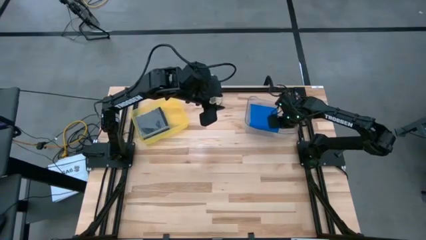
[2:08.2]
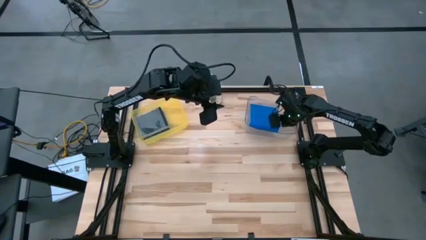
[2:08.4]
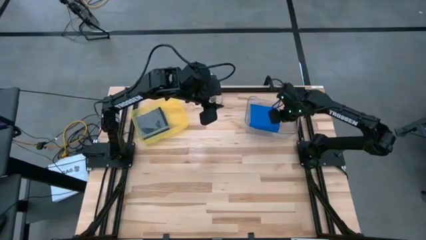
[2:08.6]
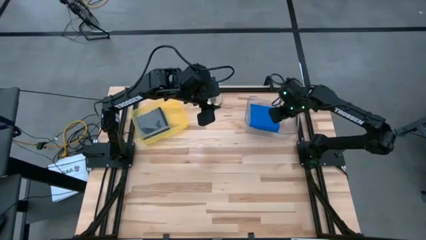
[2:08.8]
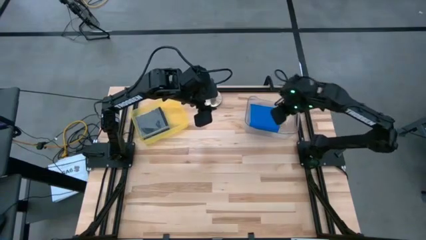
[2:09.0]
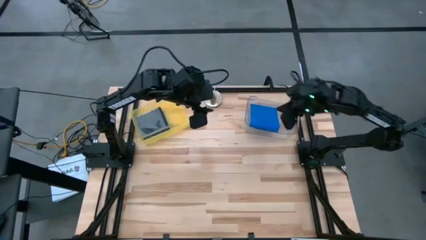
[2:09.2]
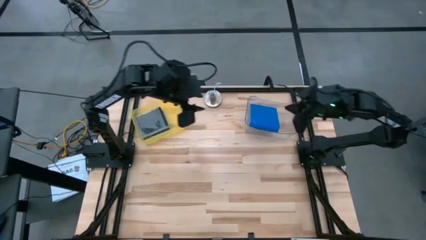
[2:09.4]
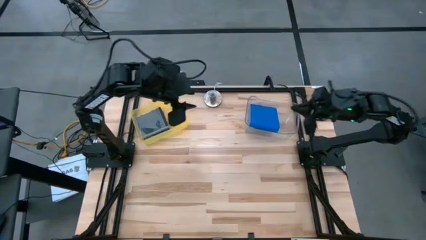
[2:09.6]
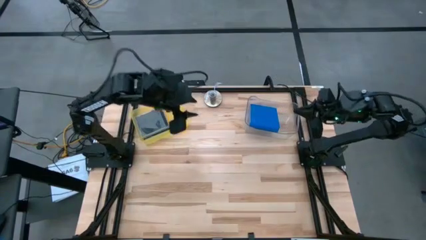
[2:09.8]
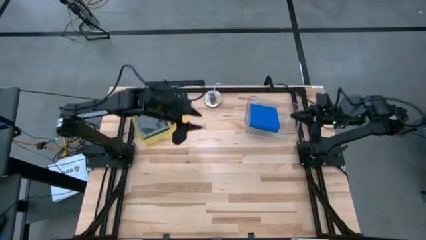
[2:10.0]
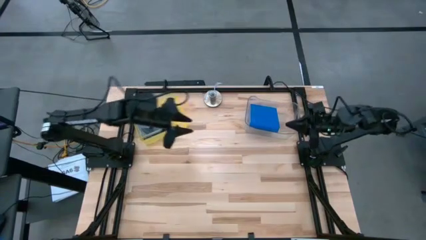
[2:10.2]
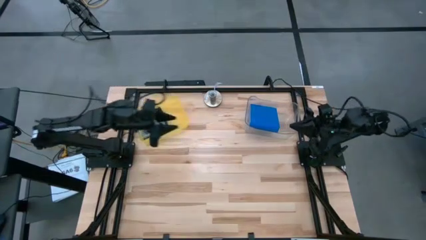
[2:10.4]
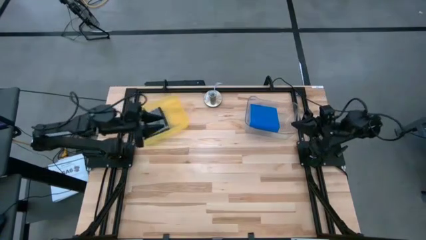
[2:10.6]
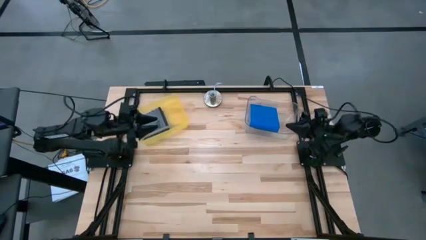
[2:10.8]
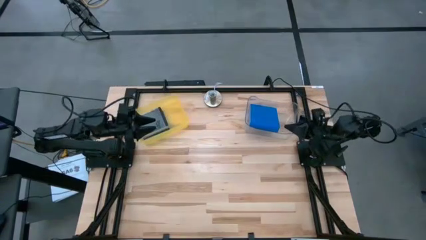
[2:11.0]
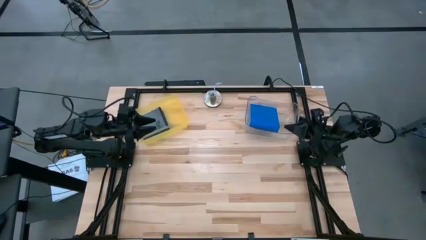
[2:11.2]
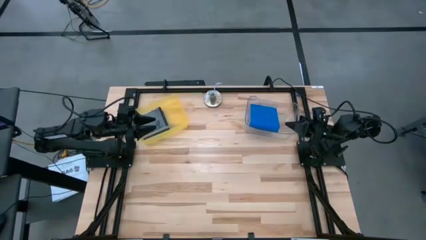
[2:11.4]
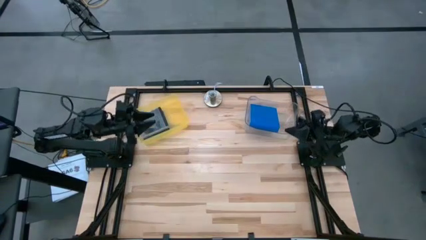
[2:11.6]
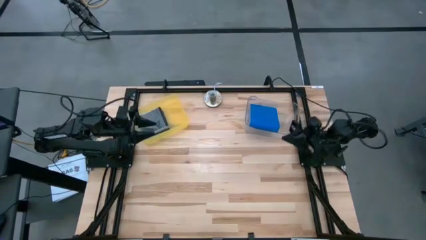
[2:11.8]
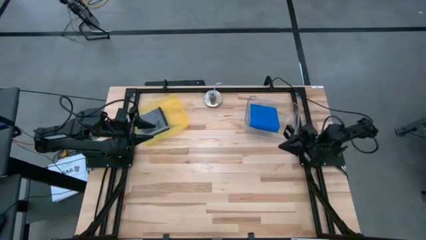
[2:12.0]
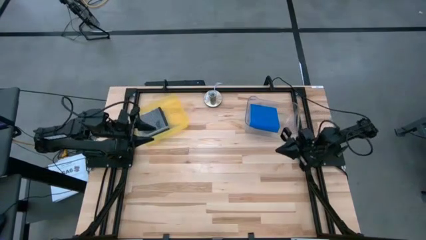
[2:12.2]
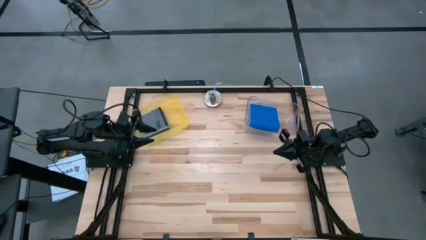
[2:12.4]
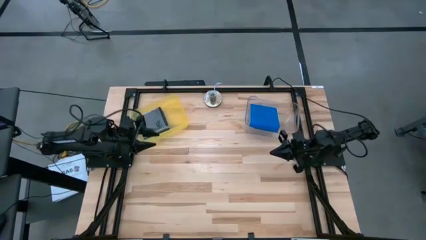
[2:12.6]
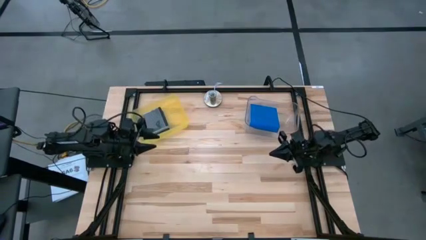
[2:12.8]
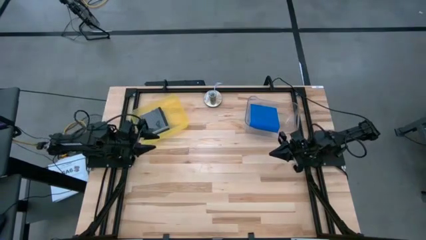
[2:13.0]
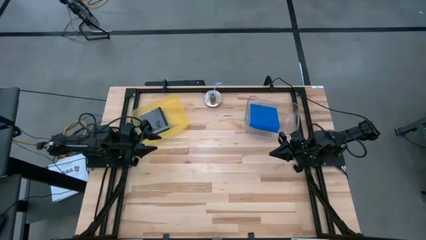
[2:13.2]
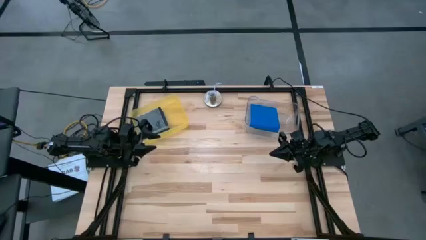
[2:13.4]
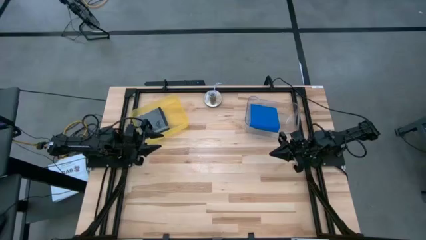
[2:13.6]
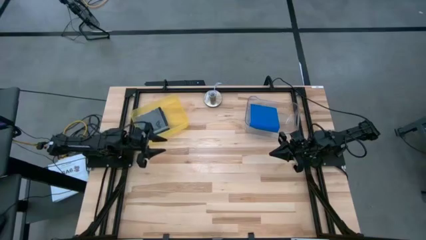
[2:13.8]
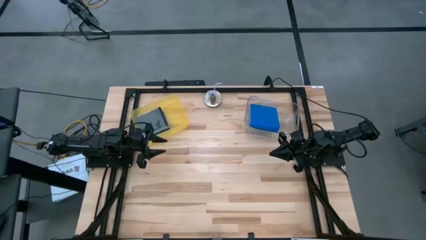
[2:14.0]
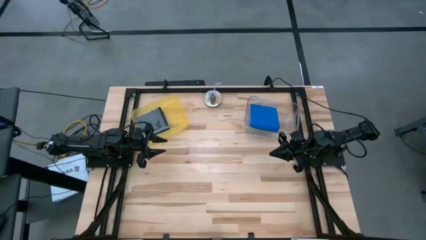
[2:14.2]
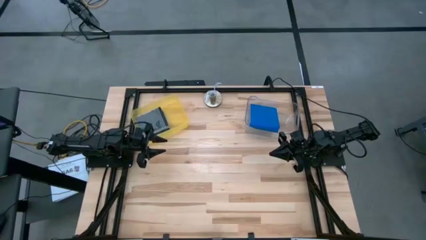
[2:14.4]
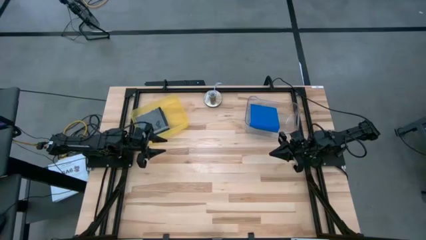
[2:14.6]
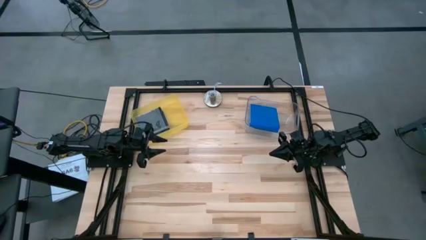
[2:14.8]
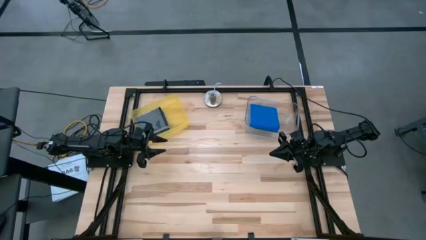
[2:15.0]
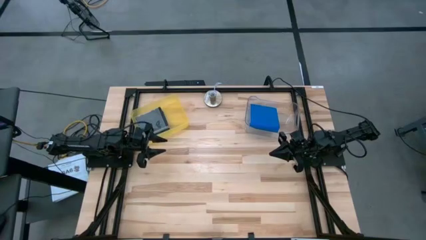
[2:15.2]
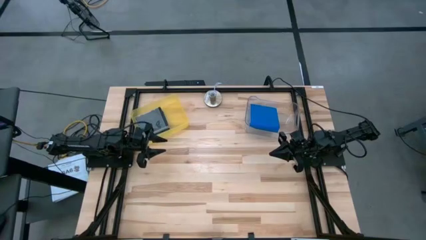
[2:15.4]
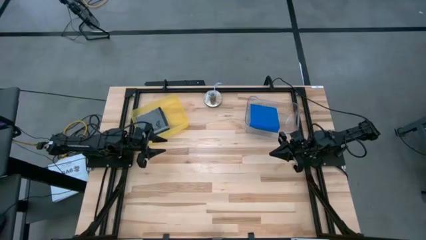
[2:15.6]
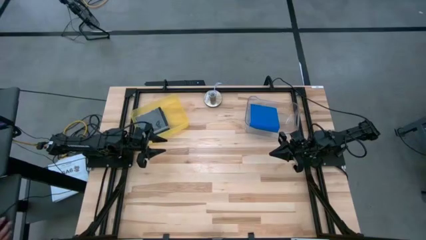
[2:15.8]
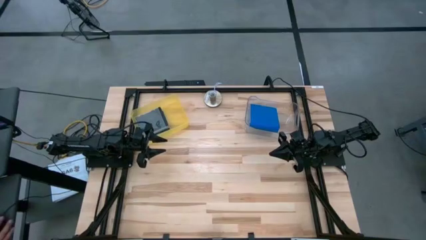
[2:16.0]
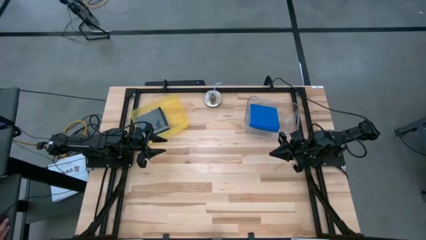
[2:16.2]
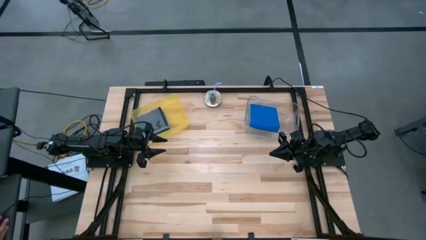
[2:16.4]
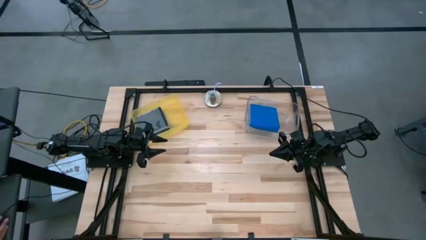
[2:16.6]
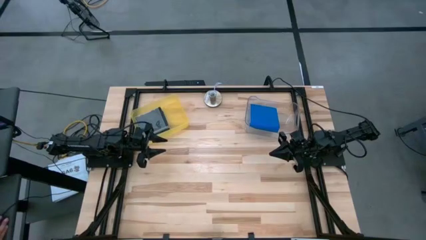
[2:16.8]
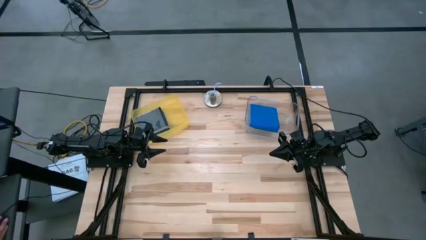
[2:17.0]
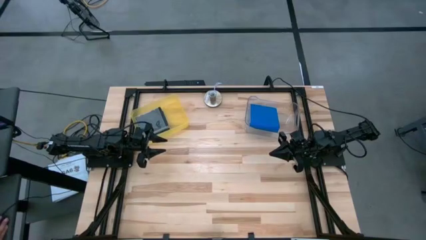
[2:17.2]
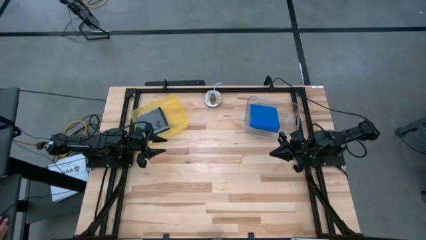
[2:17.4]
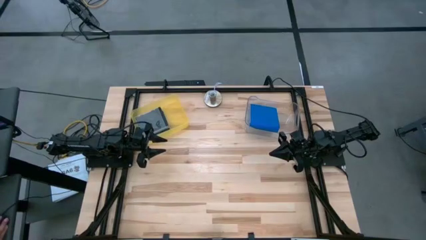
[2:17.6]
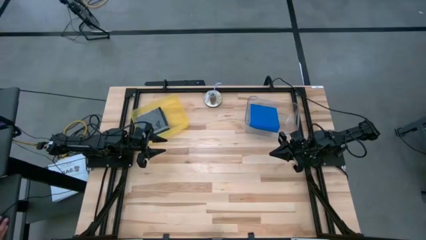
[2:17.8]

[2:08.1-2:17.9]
Task: Pick & place jewel cases by type
Return to Home Position

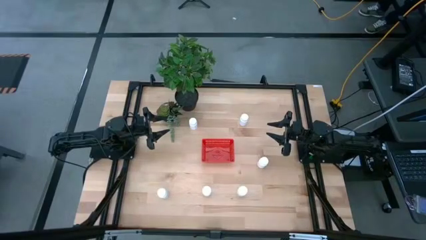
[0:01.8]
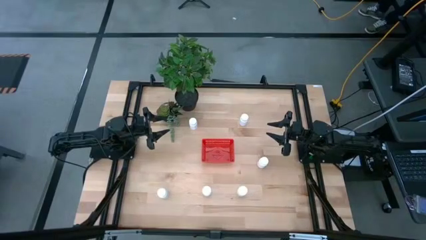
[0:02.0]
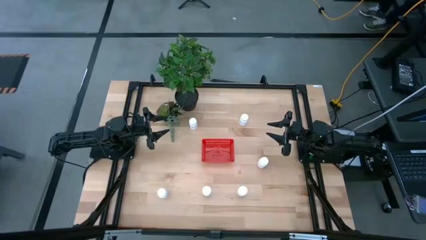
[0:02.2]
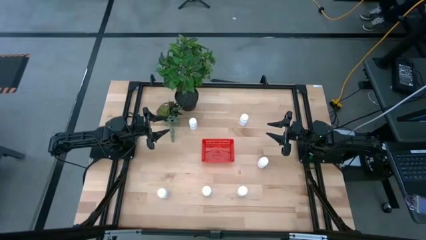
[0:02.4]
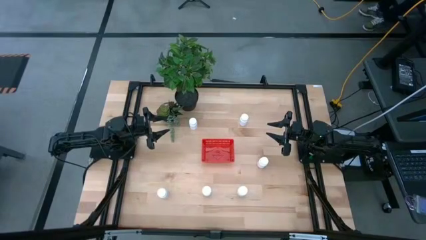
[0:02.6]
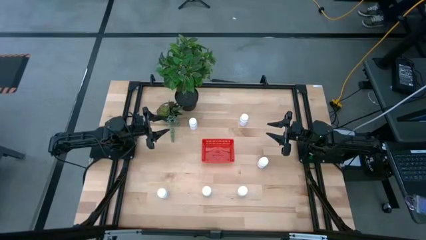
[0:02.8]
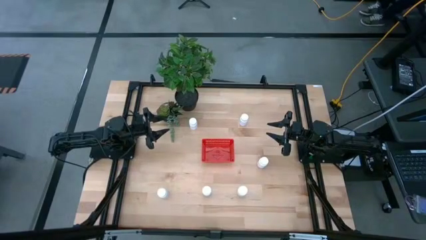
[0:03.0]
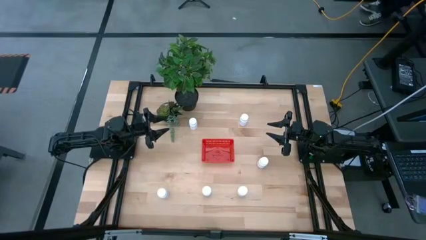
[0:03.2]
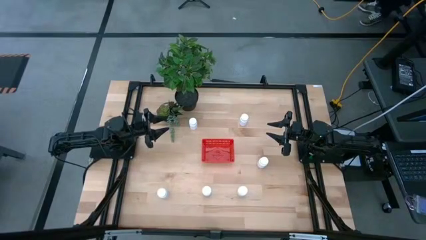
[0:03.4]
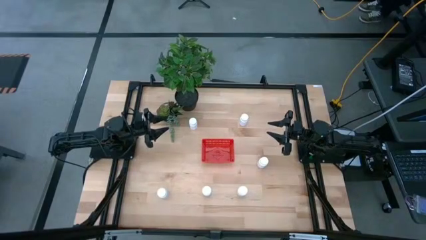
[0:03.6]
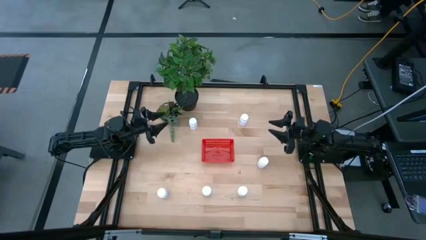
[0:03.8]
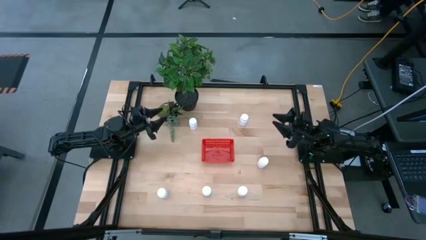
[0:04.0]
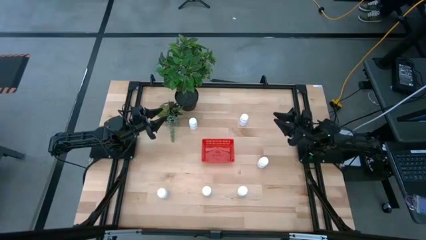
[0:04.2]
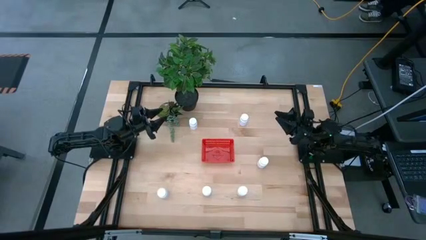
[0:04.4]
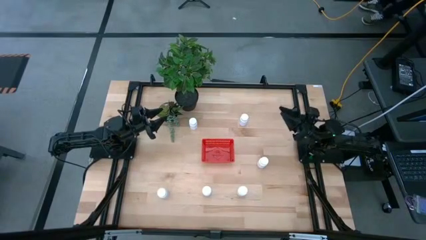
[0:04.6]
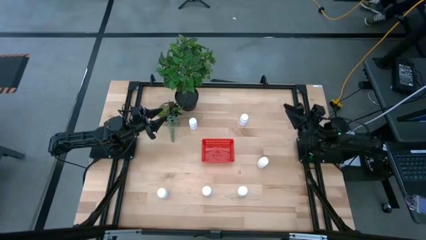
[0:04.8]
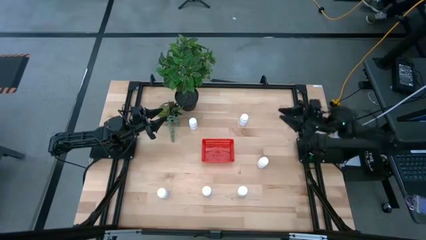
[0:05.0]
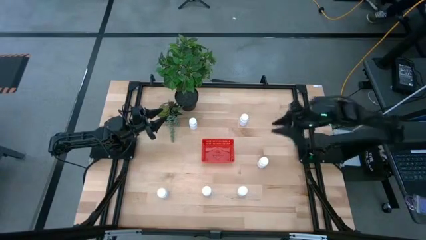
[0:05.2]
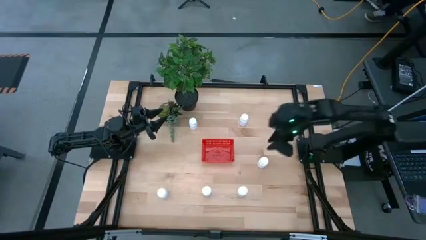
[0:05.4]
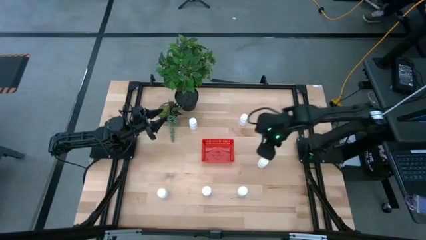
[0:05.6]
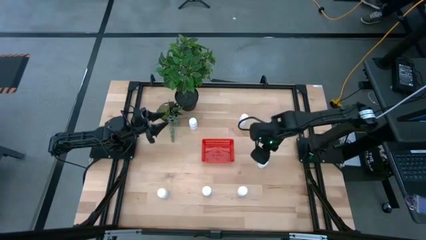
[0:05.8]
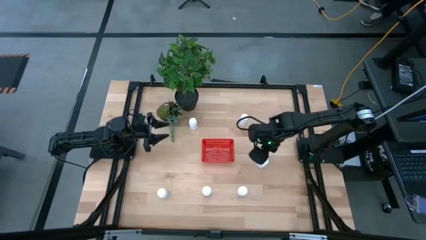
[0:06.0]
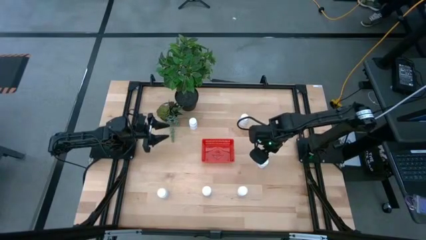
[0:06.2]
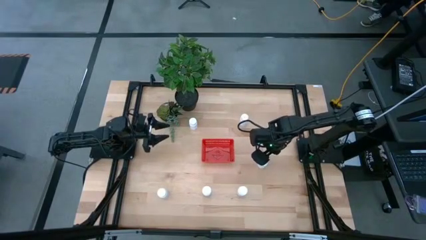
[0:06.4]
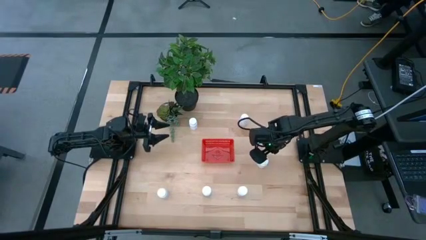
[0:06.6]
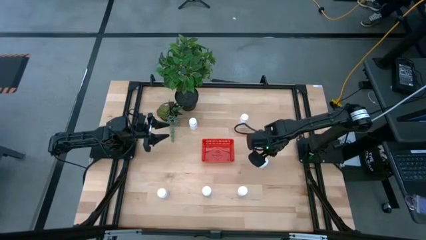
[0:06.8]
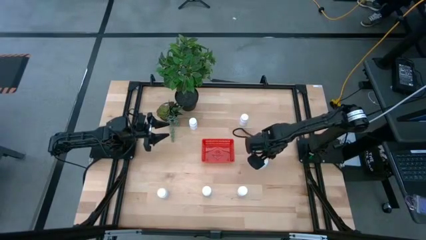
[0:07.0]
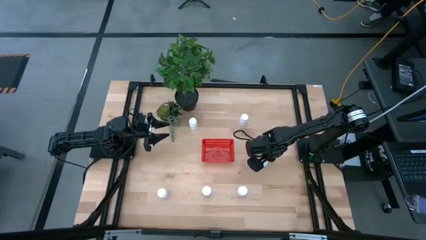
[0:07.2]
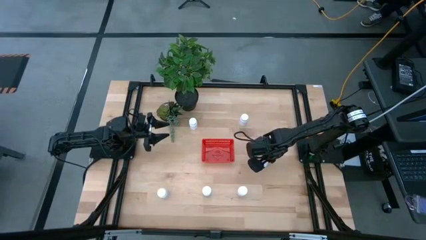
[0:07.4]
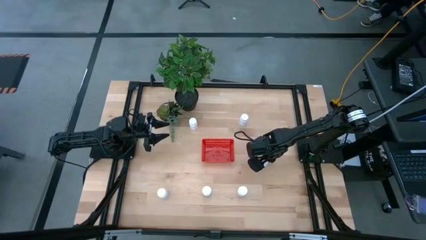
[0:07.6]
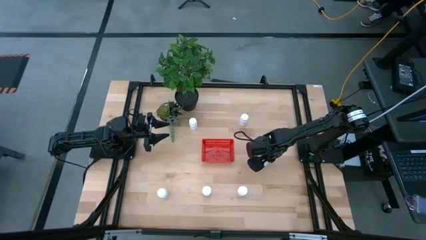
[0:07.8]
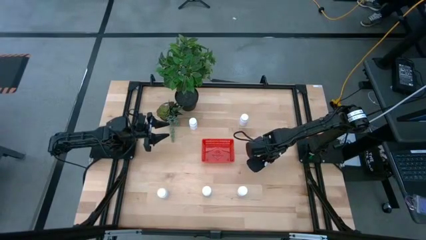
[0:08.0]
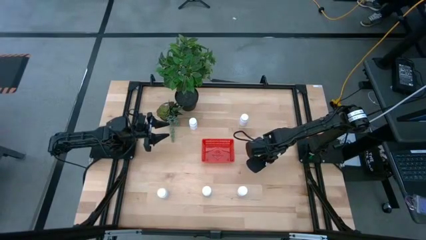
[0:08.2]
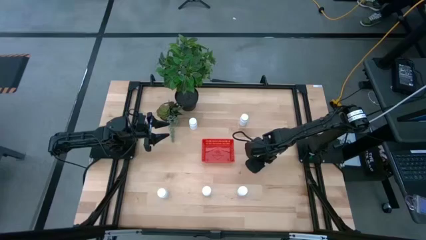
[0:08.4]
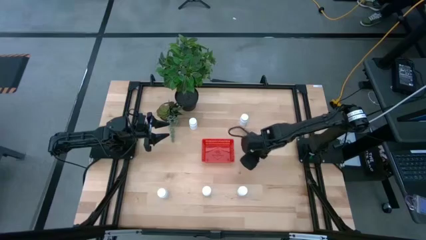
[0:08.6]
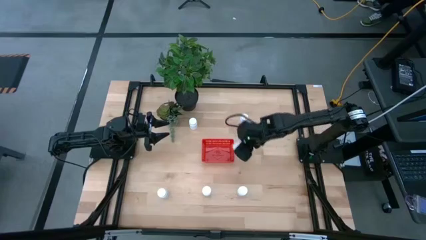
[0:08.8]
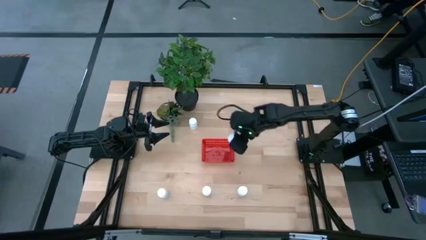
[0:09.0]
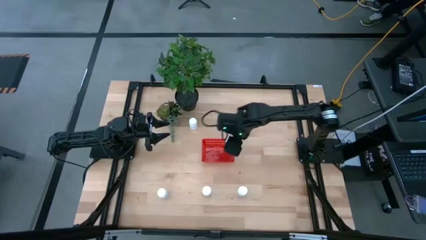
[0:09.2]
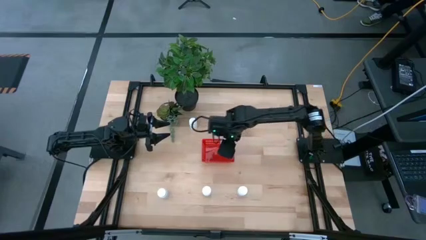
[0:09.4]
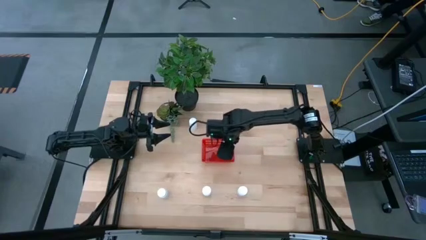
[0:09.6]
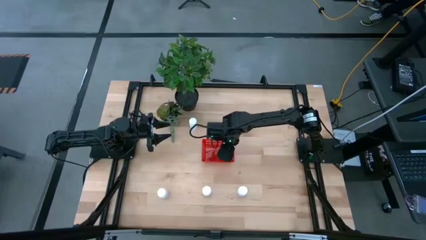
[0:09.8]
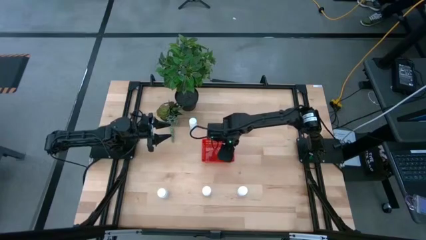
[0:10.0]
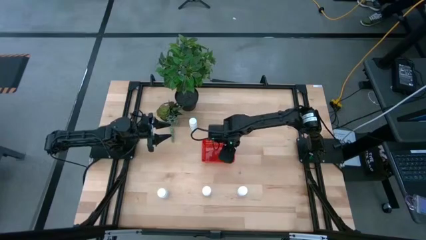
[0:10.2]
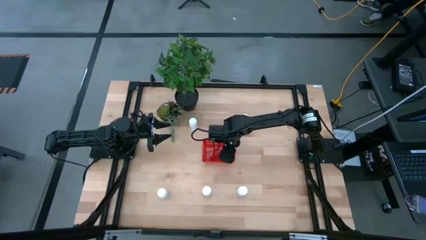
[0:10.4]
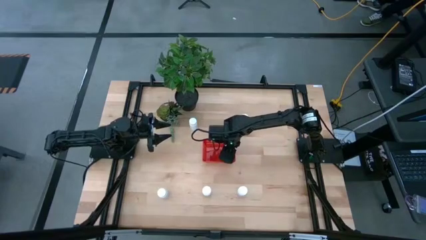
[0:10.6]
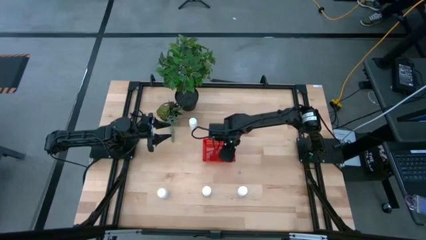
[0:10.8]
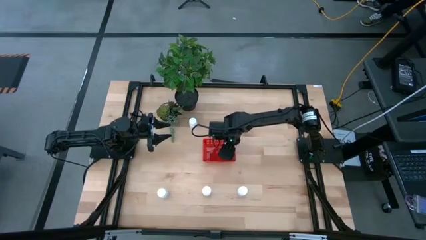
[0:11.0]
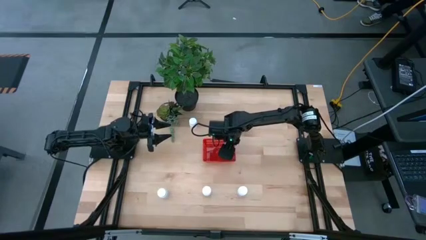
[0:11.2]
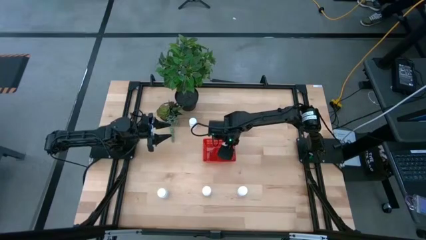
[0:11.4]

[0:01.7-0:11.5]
Task: Pick and place pill bottles into a basket
Put the white pill bottle into the red bin
